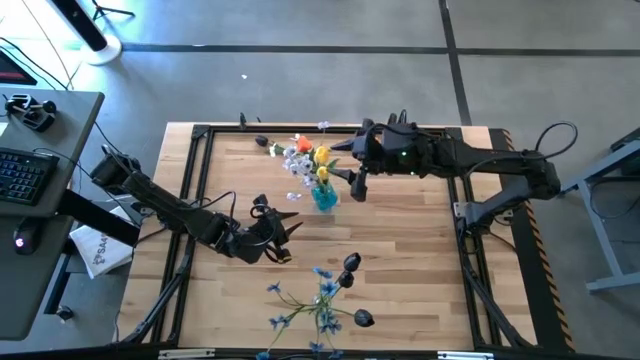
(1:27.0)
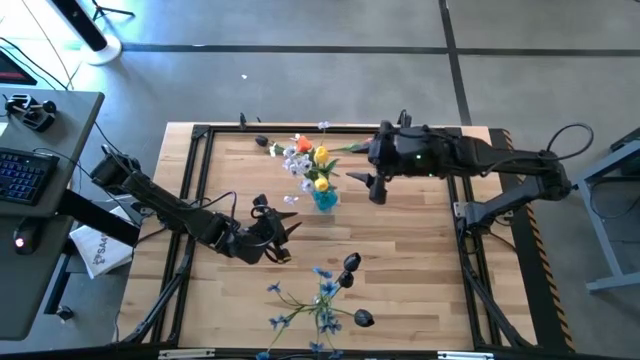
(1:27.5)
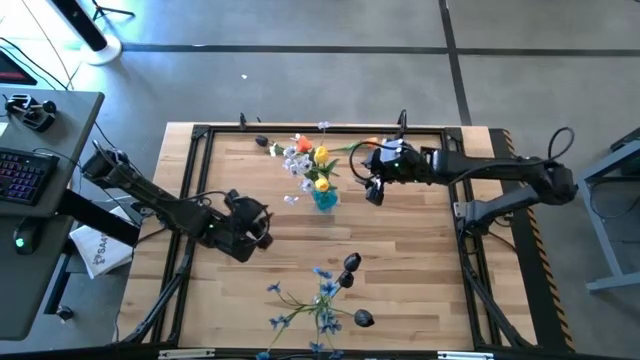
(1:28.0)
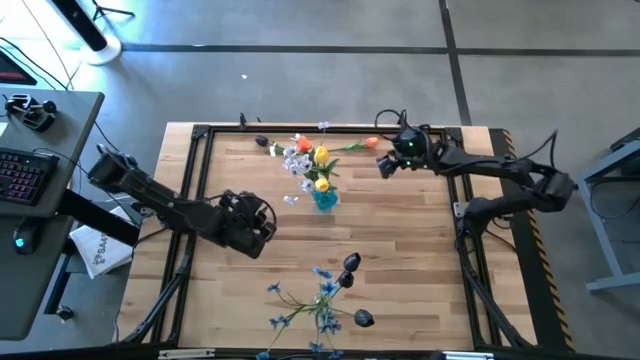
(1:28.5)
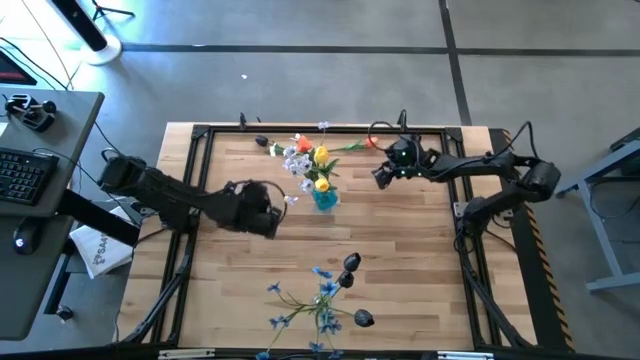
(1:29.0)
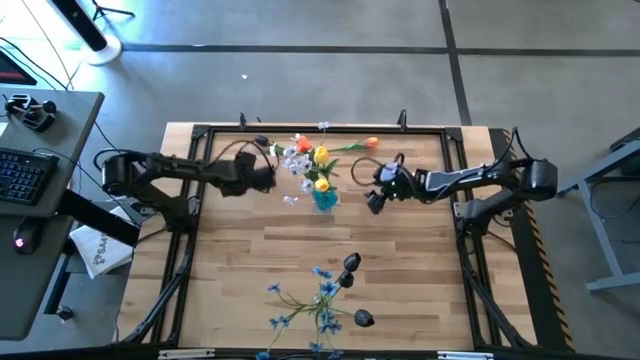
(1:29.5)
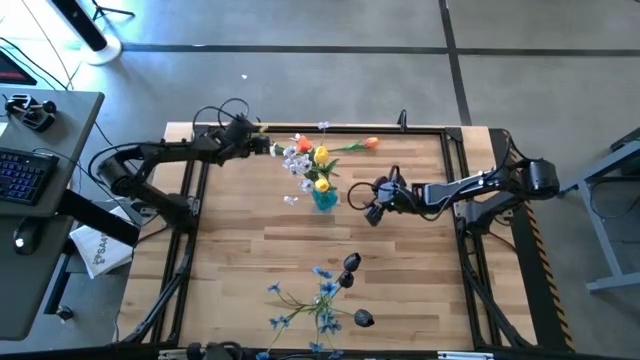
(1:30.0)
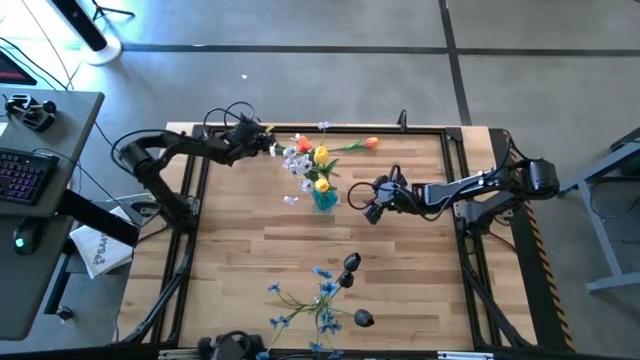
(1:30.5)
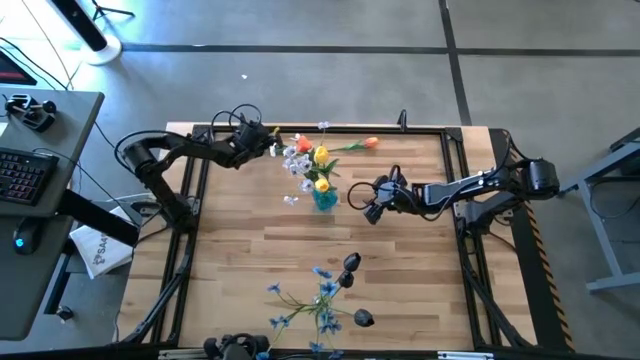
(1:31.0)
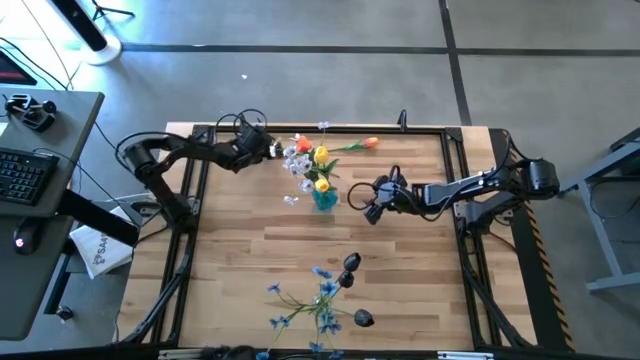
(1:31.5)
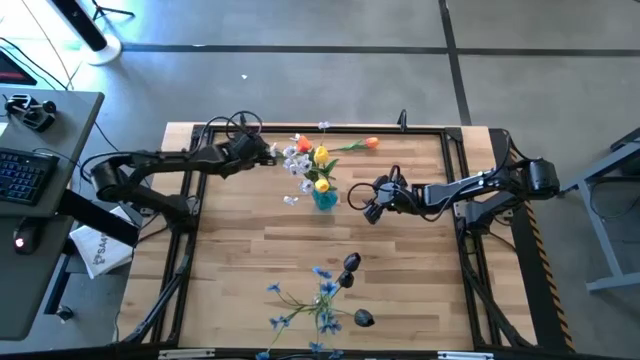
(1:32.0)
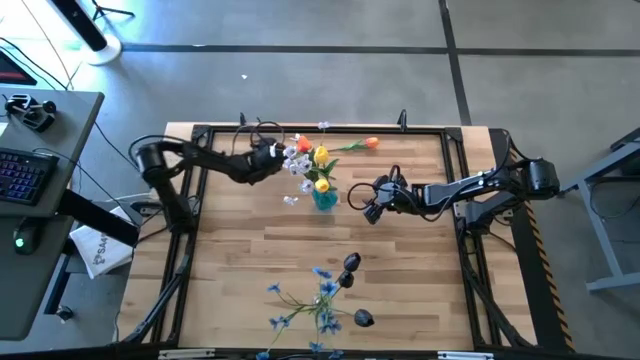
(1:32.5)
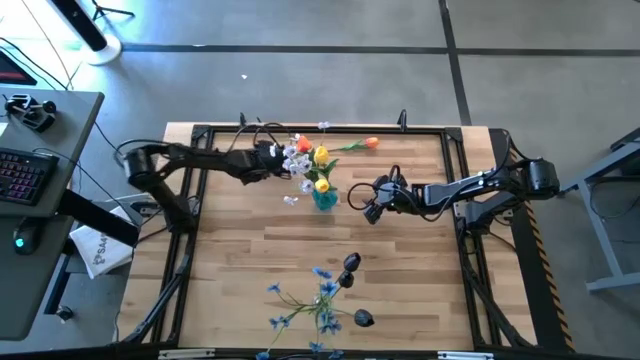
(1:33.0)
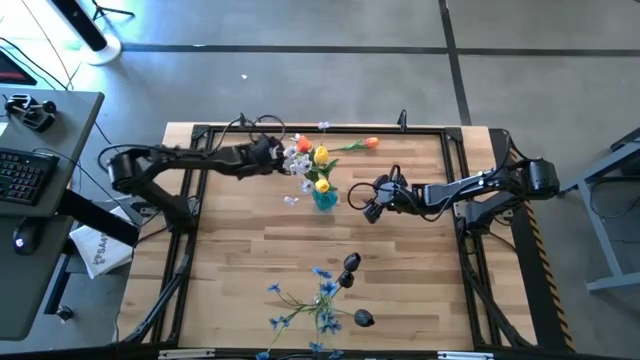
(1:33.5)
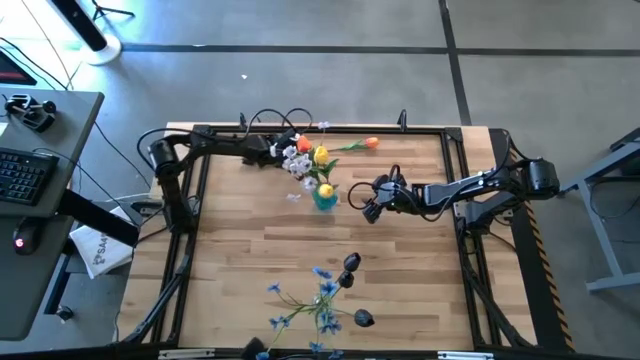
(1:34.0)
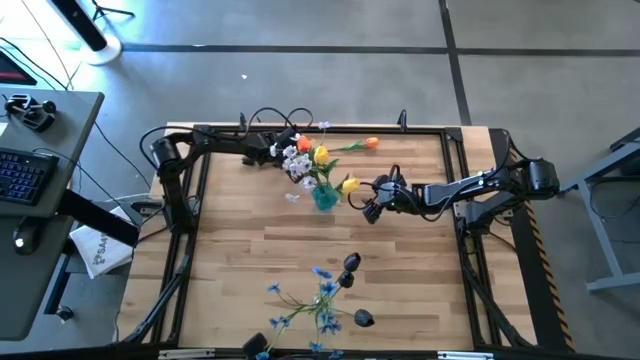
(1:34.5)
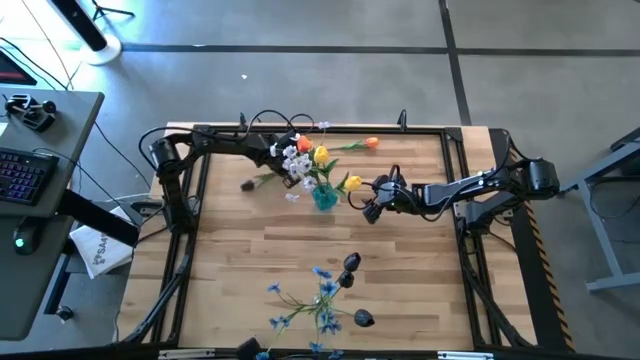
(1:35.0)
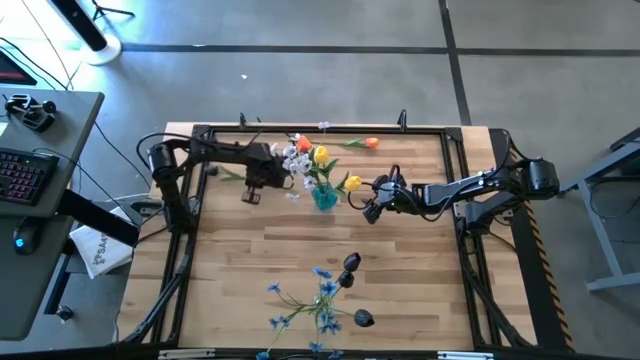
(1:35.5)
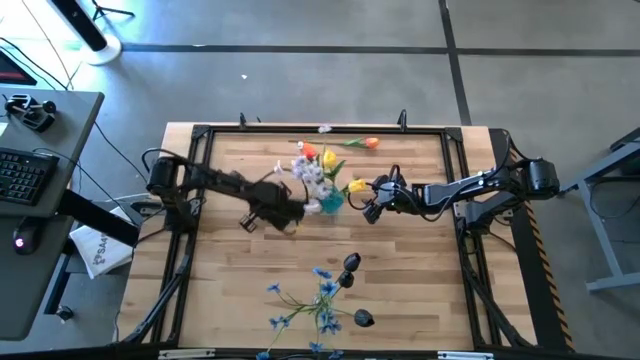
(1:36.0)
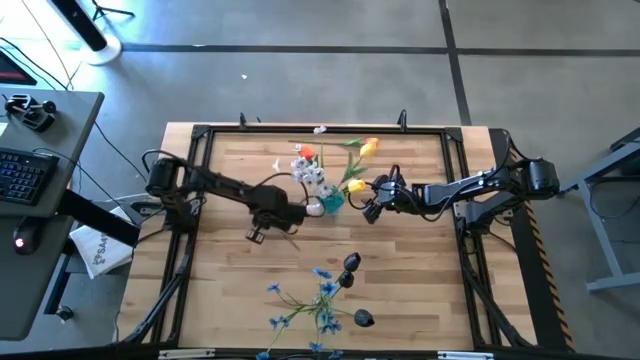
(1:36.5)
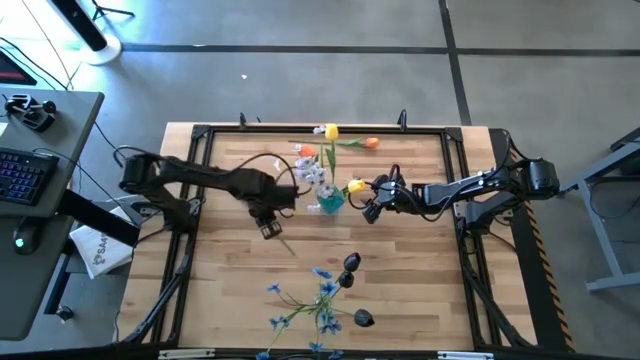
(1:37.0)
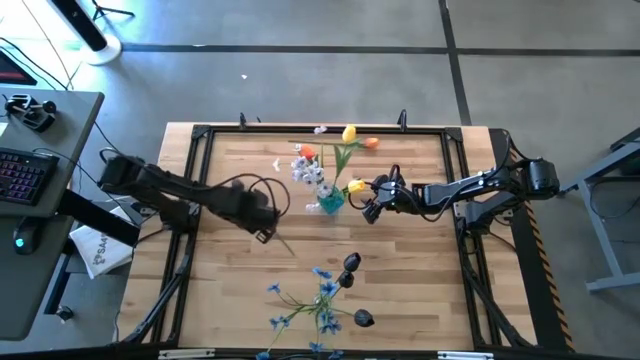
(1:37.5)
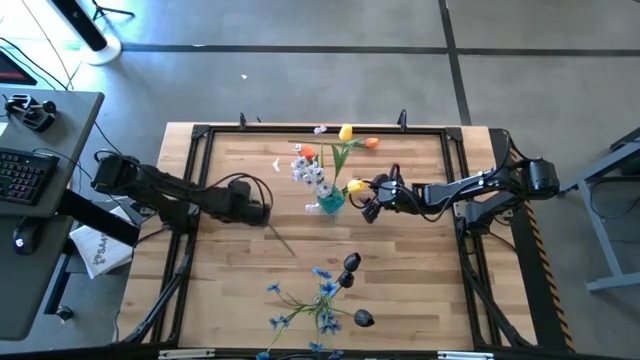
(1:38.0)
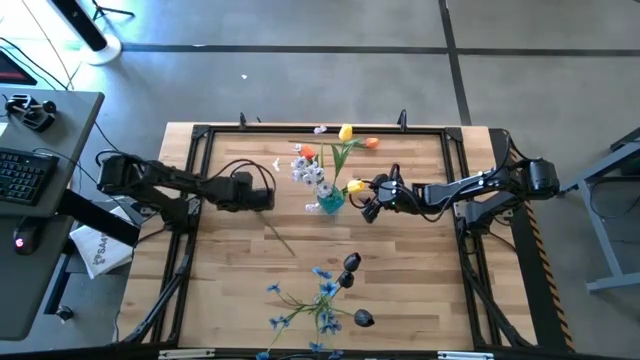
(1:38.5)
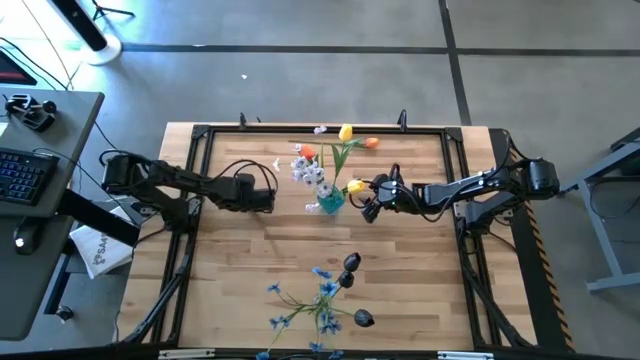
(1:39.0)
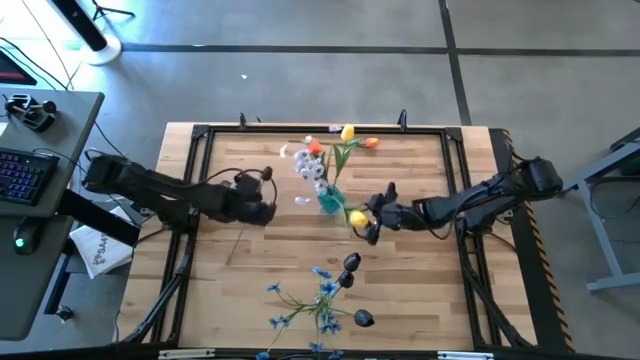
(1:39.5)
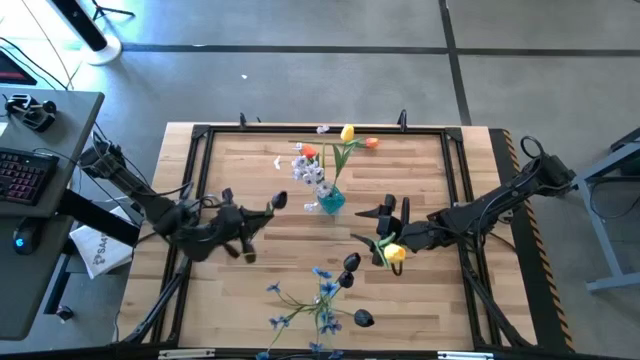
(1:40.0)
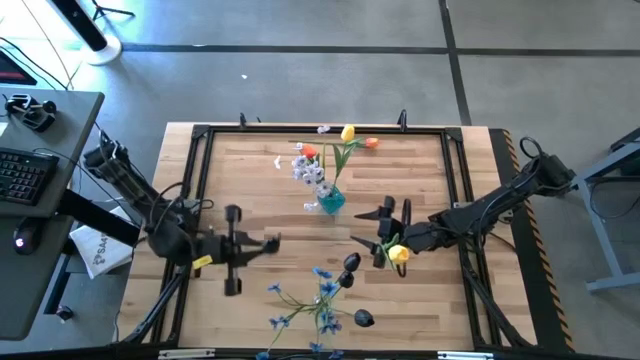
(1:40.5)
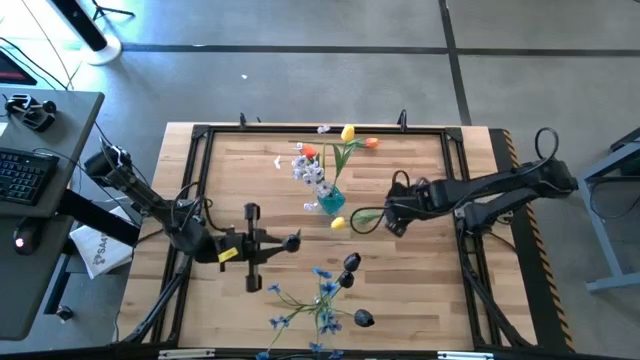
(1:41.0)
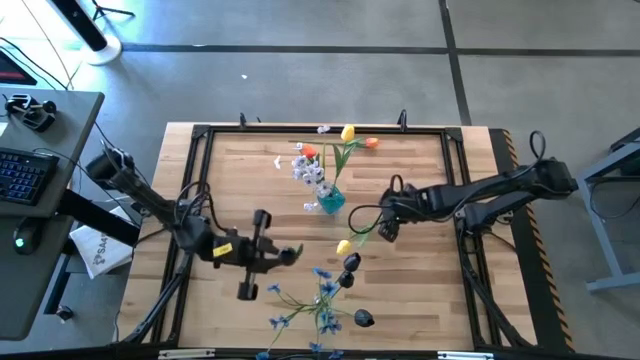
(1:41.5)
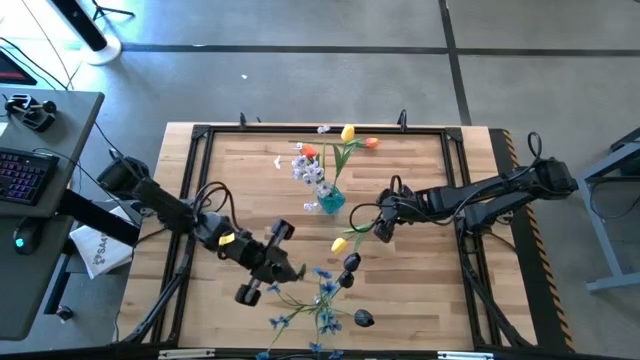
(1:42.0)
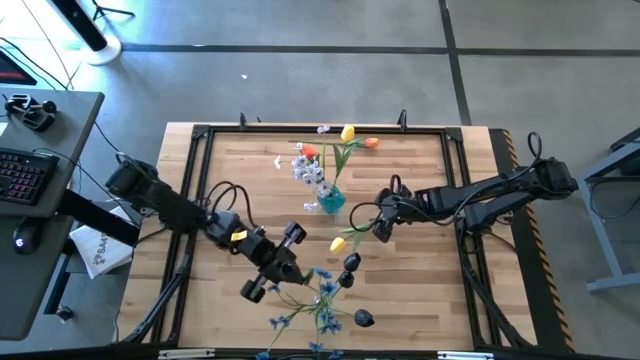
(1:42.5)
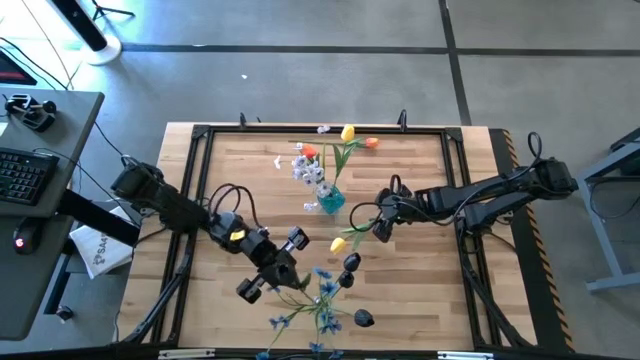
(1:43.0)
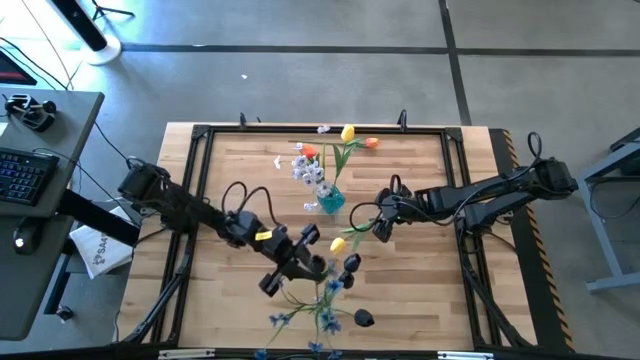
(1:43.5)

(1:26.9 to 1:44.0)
Task: Sort flowers into vase by color
Put the black tulip into the transparent vase

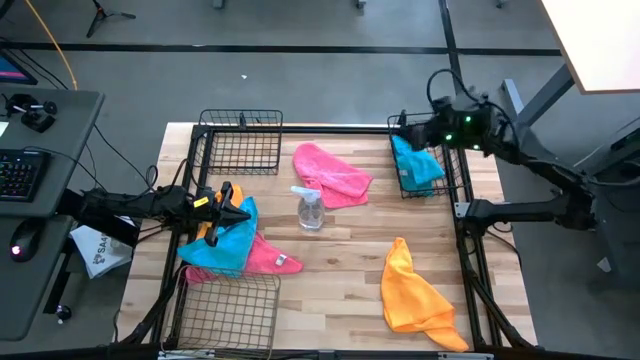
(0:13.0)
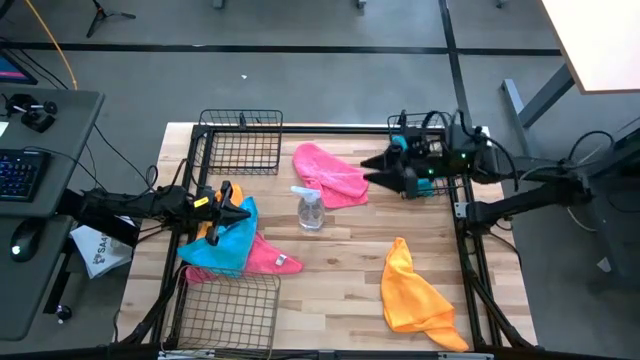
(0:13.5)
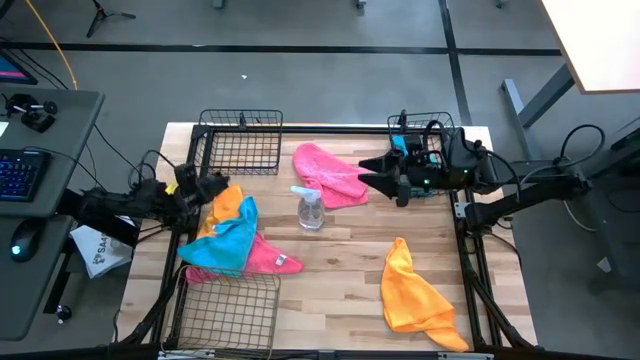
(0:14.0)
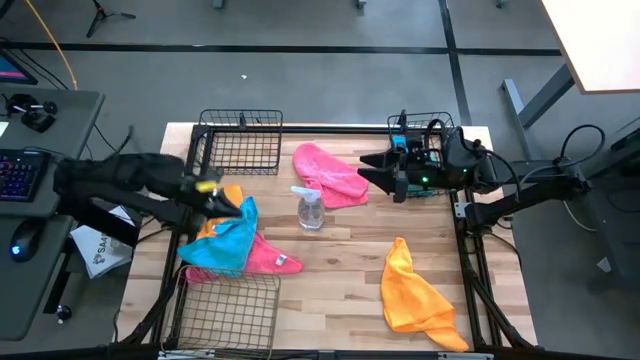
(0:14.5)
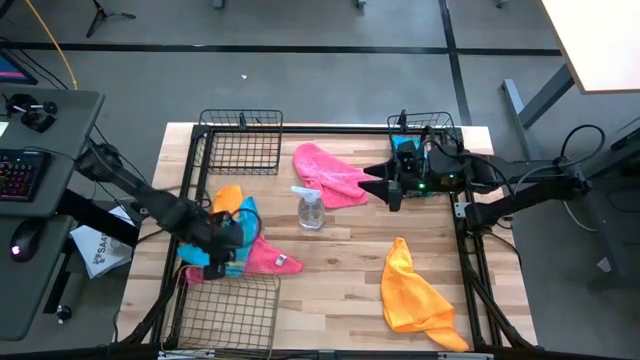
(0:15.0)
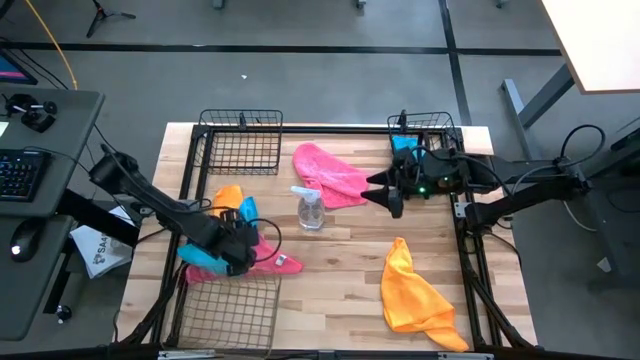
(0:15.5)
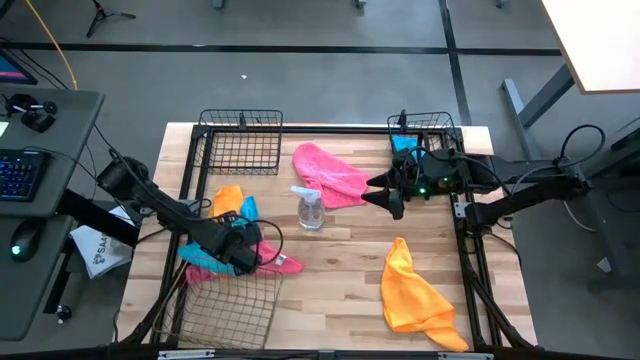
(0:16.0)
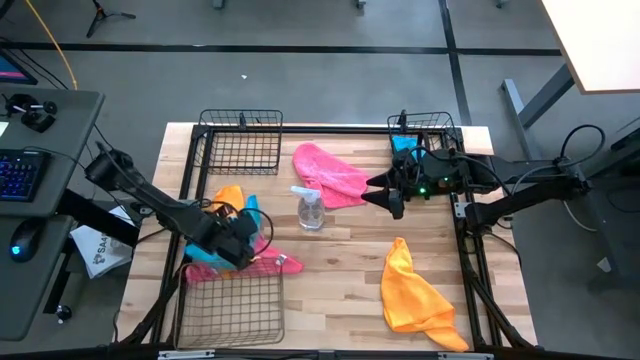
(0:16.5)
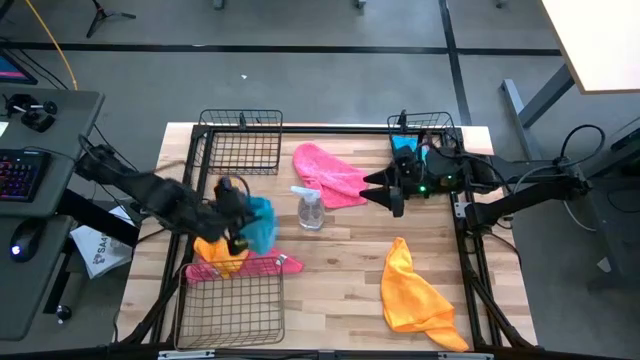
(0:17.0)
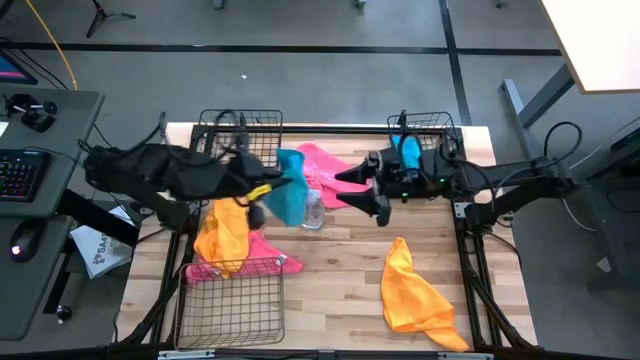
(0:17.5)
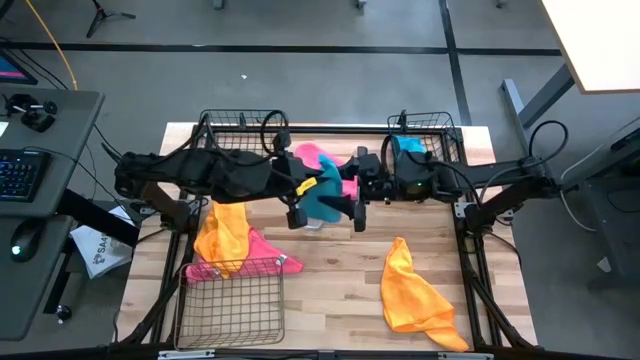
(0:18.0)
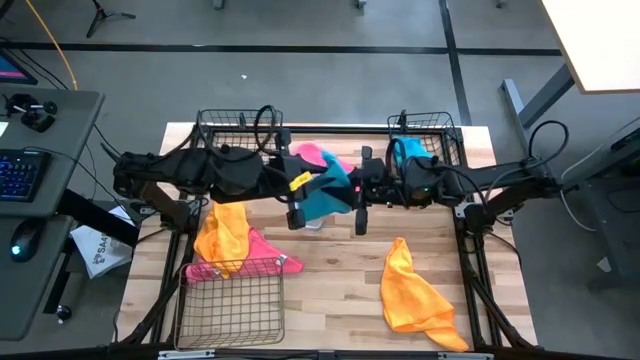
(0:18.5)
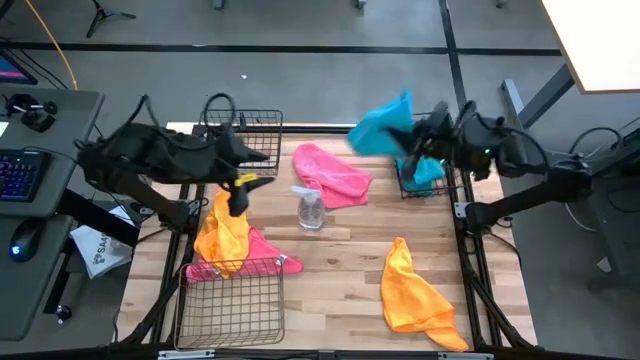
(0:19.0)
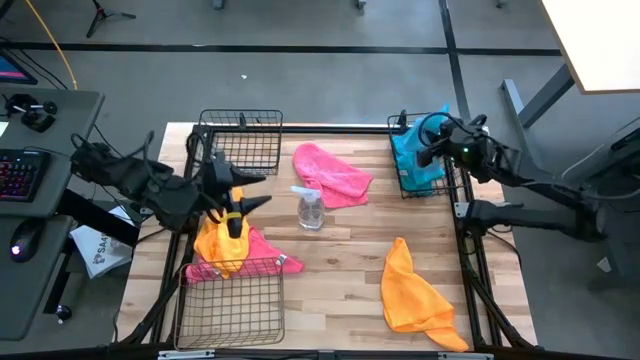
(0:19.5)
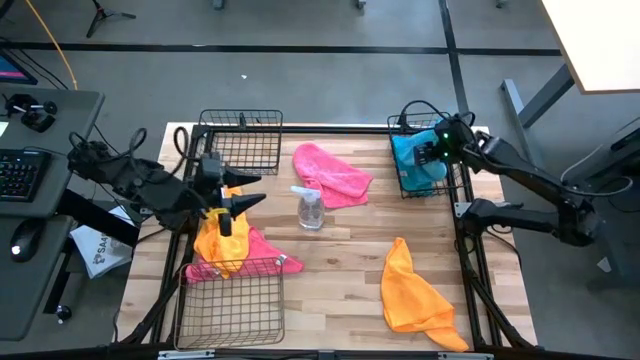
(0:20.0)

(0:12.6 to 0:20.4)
Task: Sort microfiber towel by color & place in baskets
Put the blue microfiber towel into the right black wire basket
